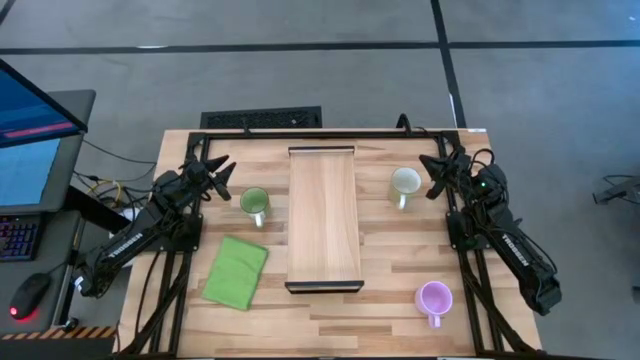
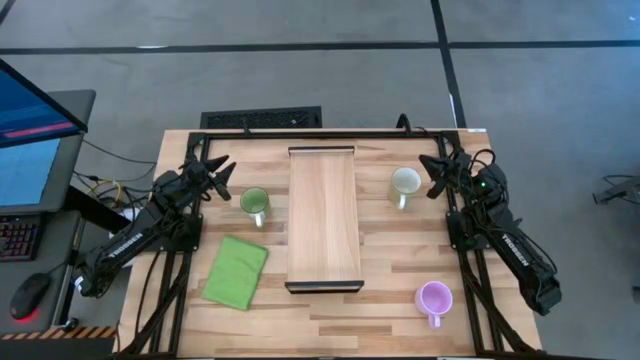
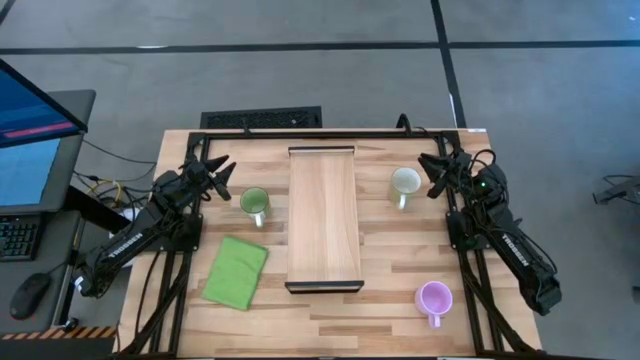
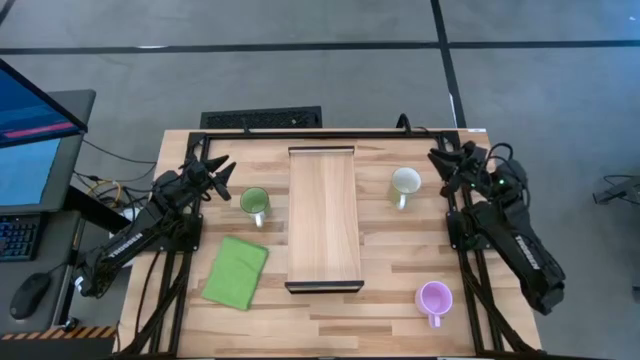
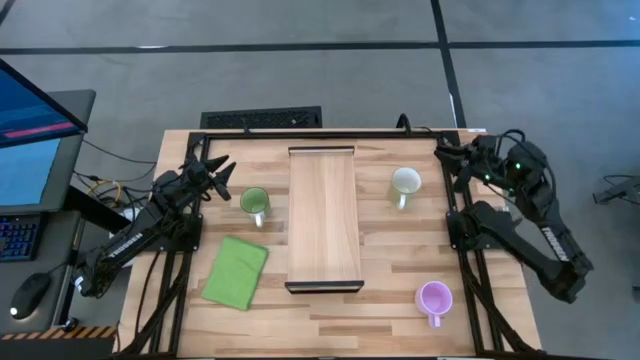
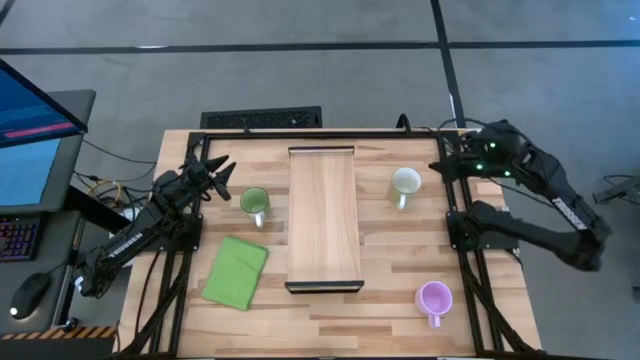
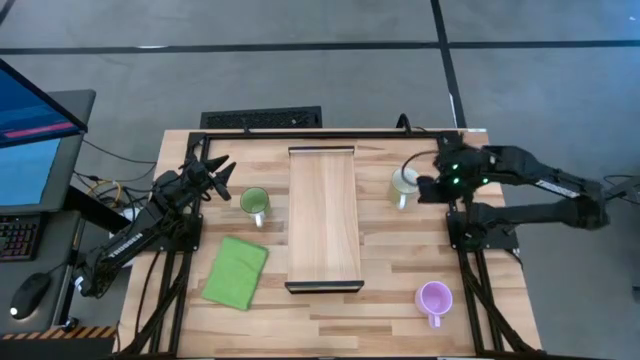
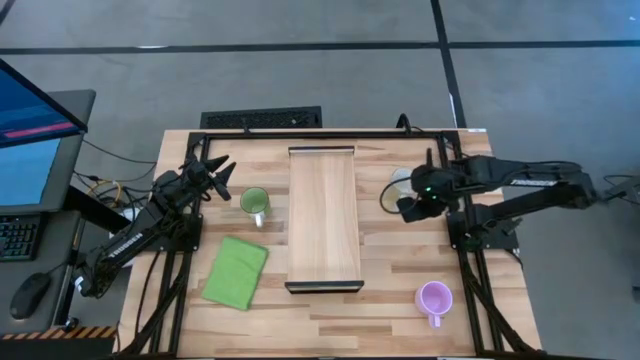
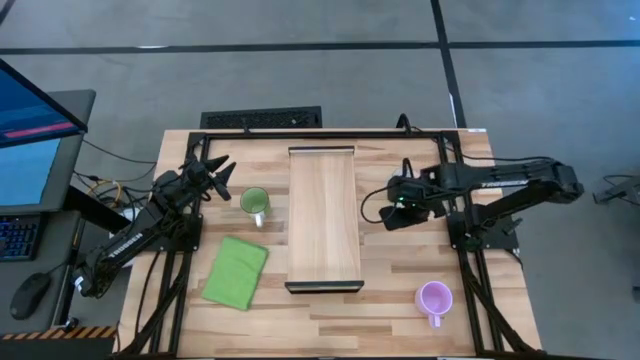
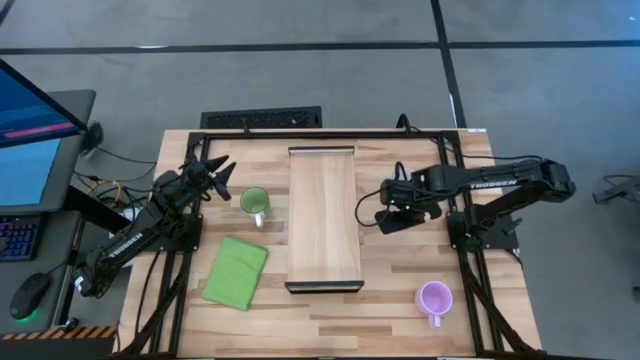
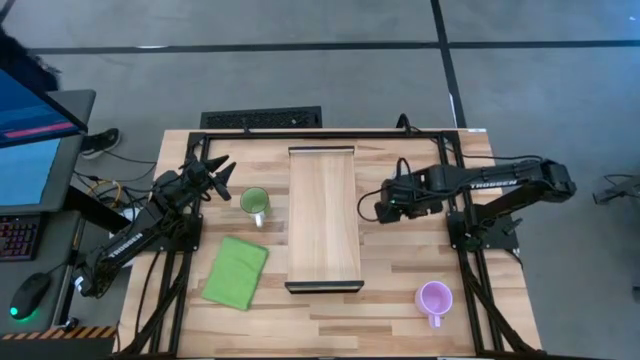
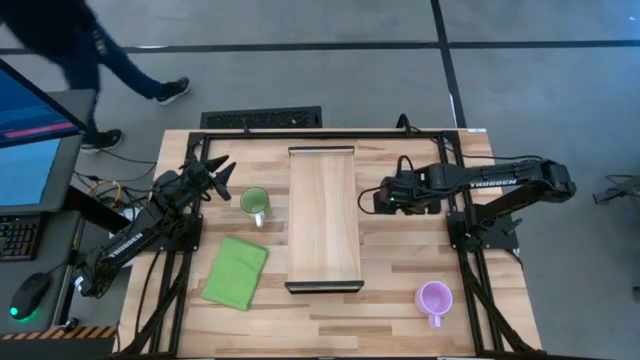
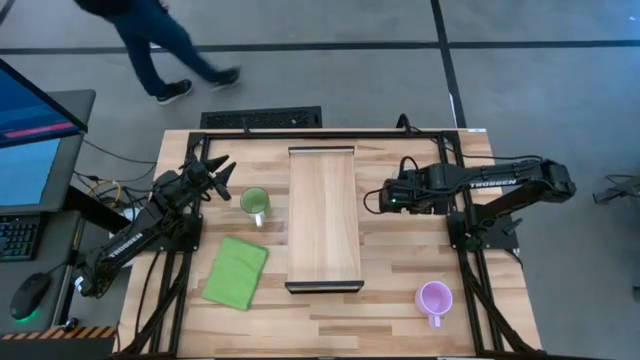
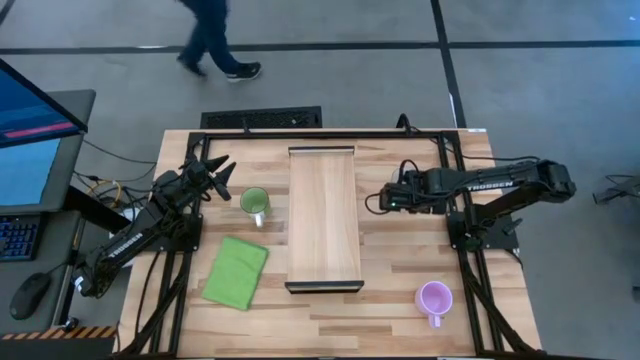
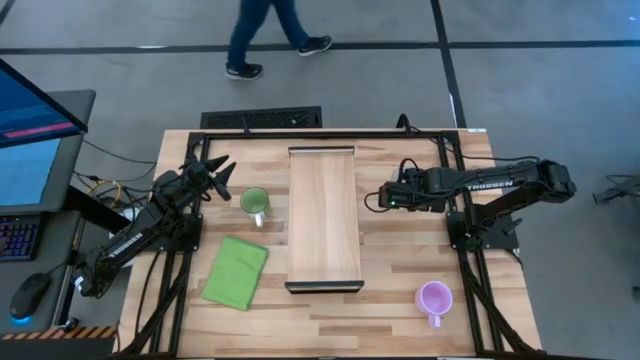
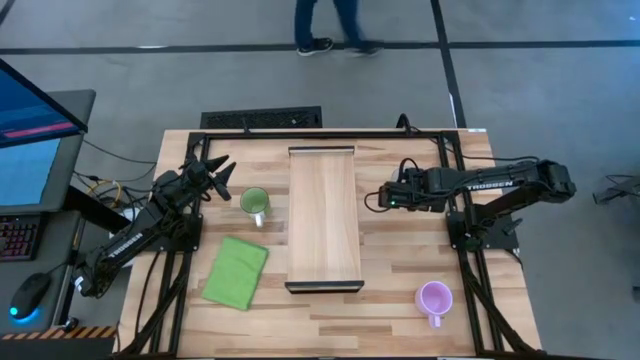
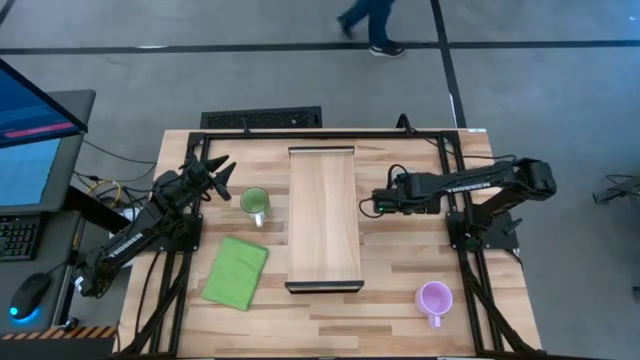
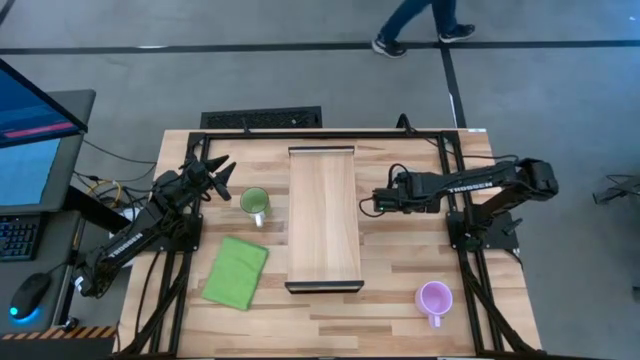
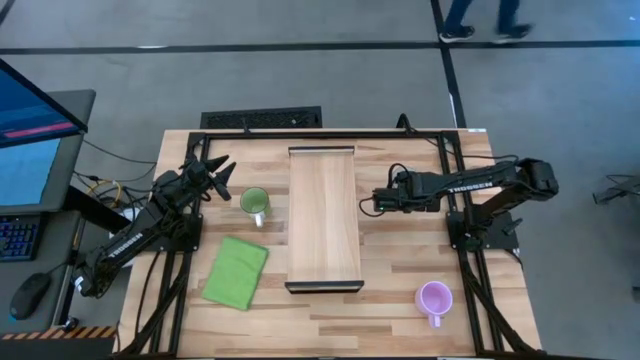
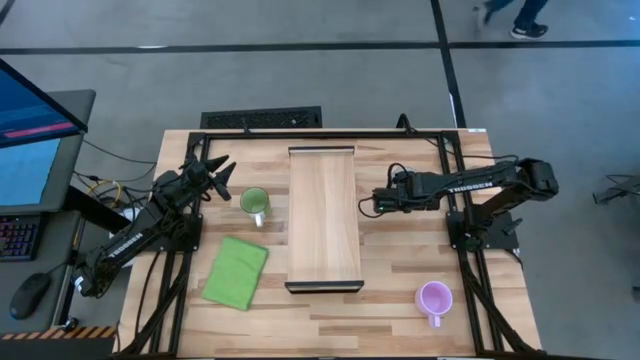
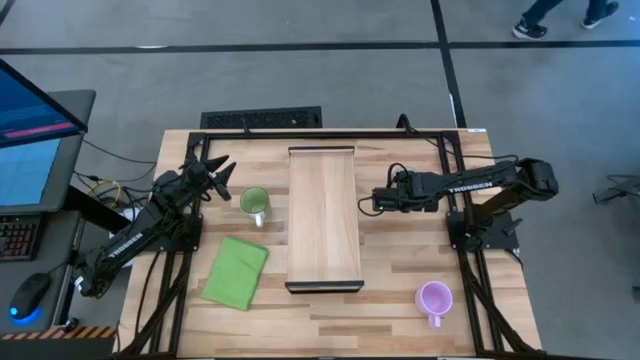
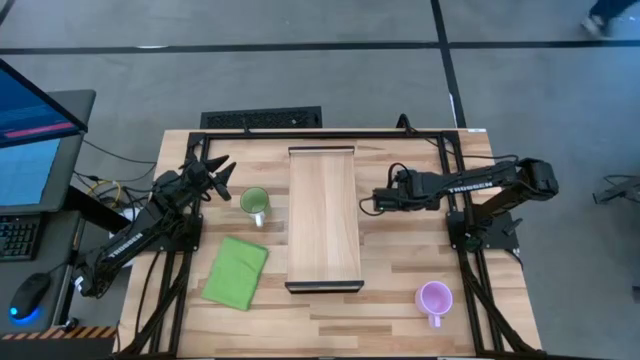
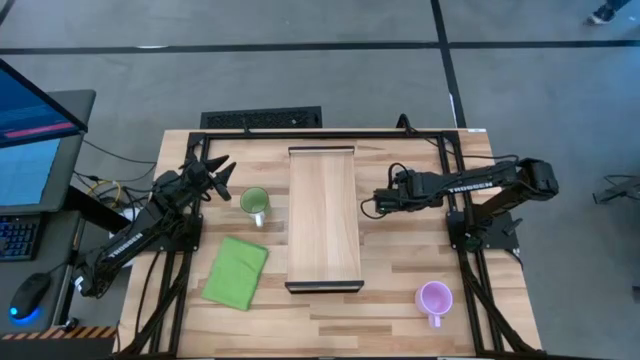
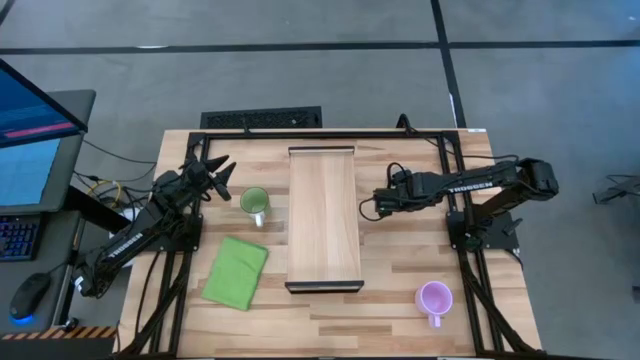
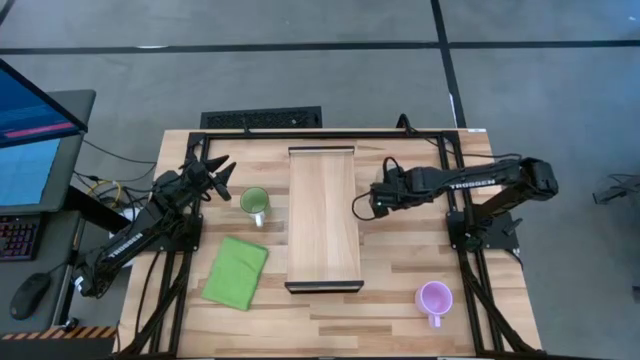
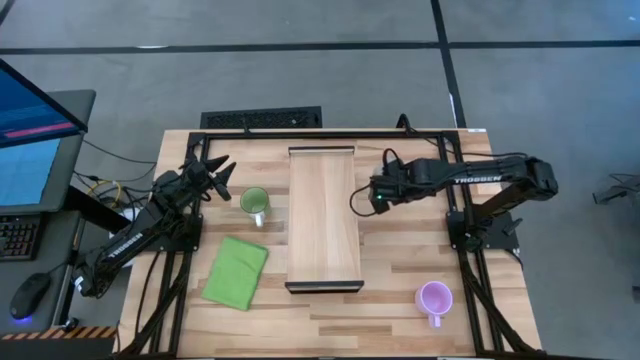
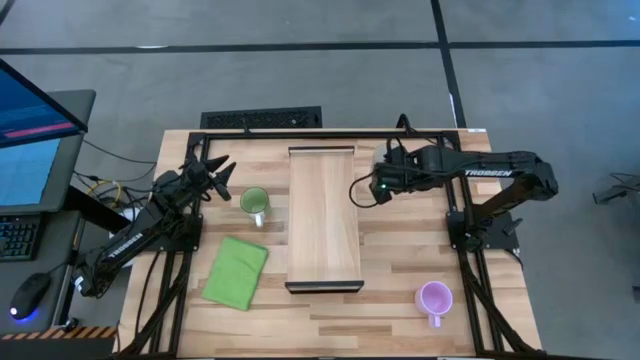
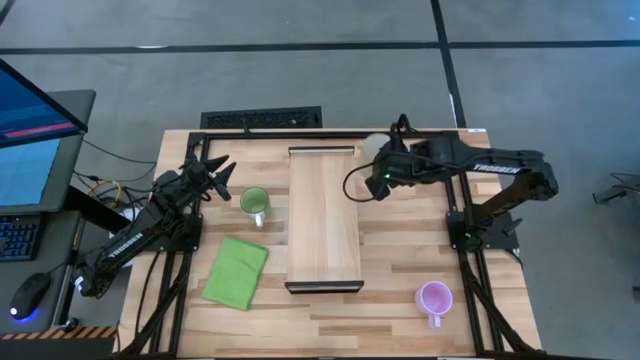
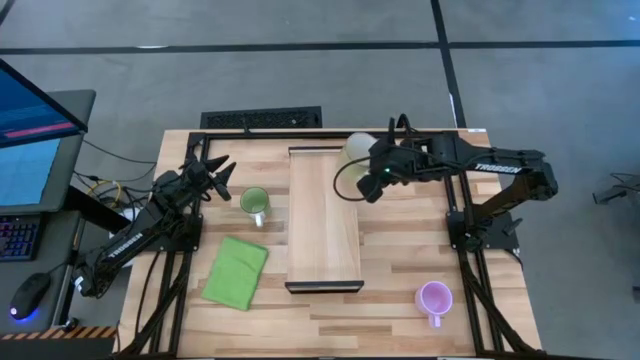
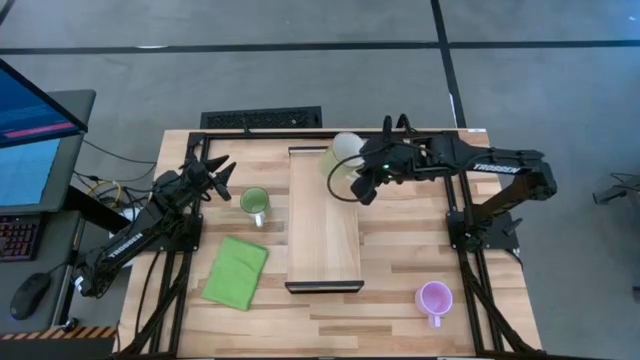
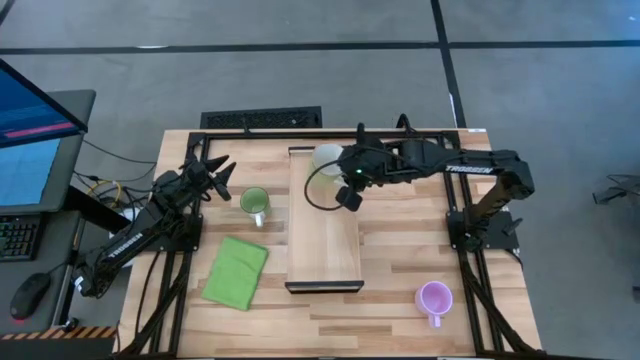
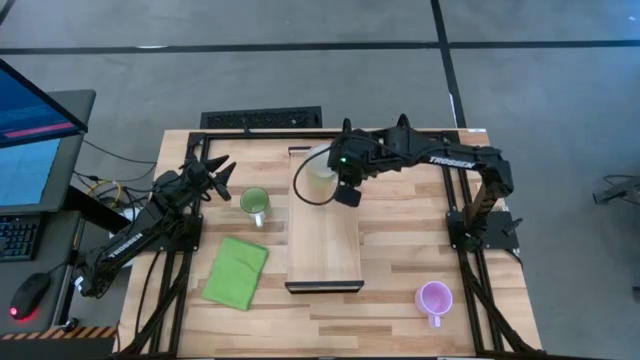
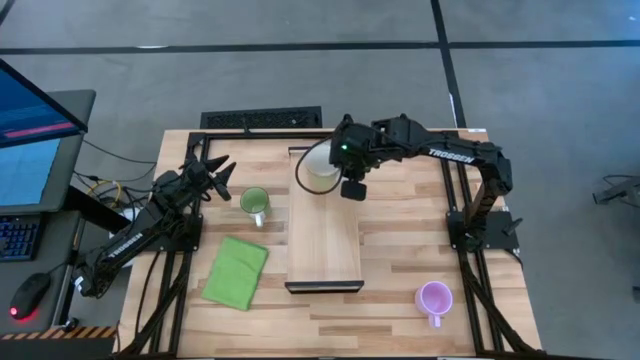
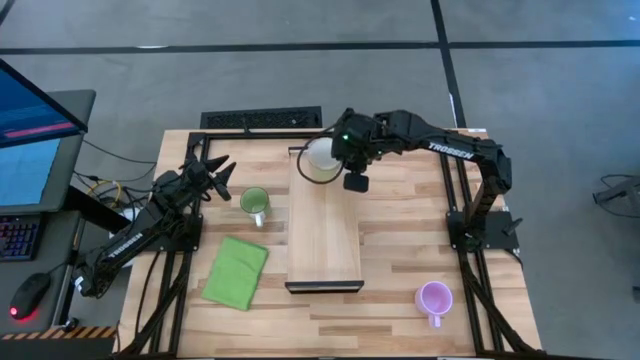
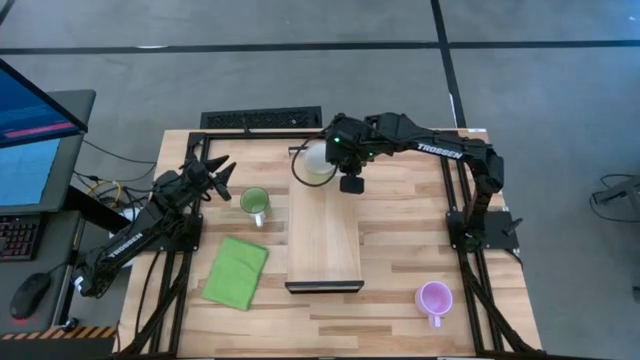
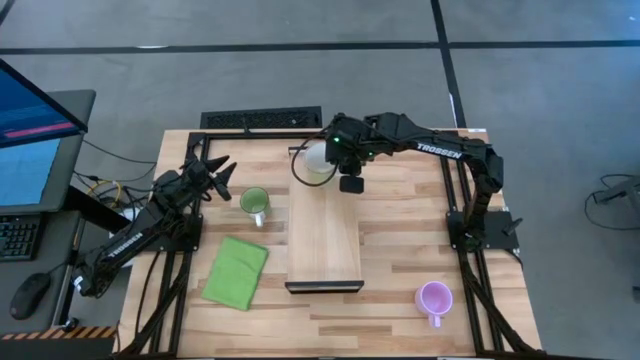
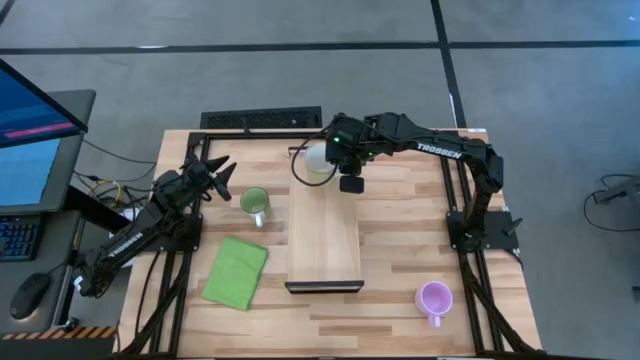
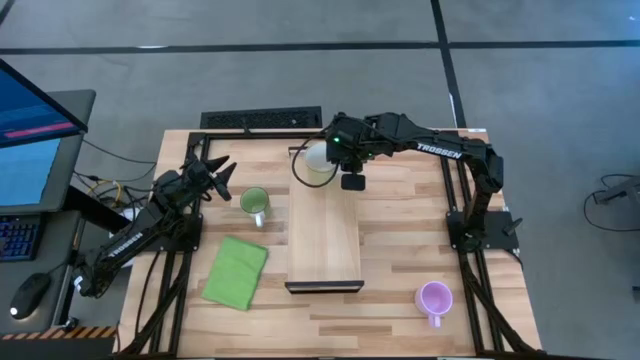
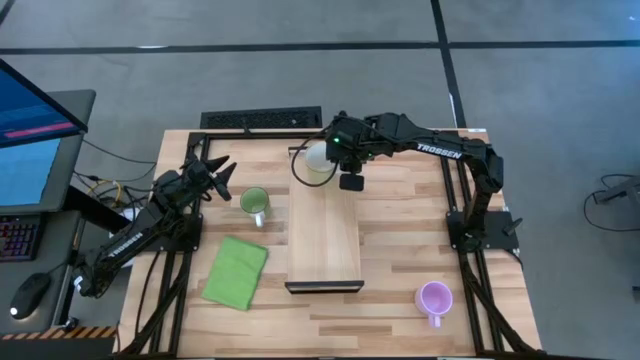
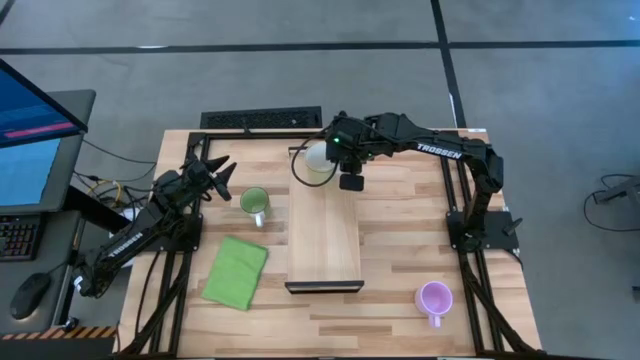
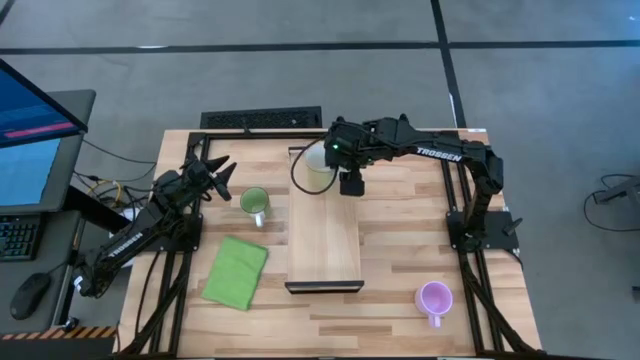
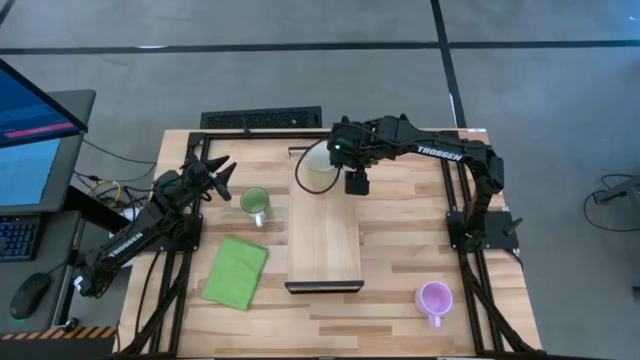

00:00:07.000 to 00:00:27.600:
Task: Stack small to large cups/mugs on shelf
Put the light green mug on the shelf
